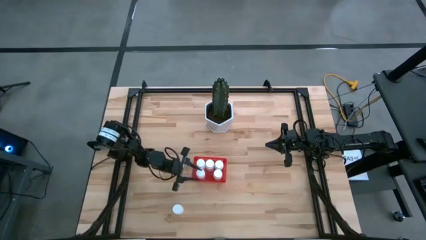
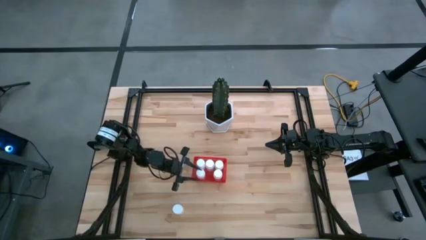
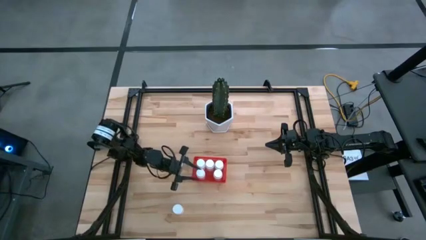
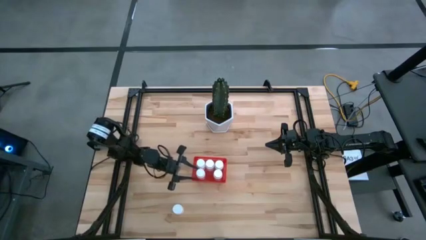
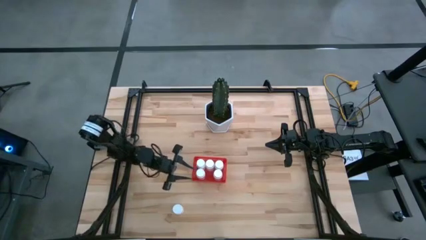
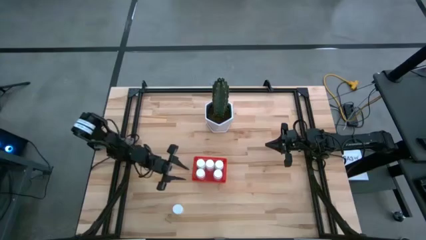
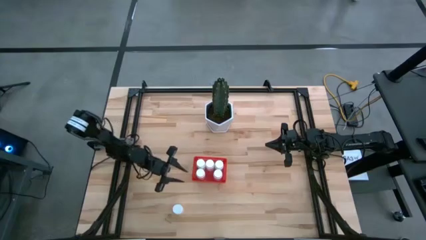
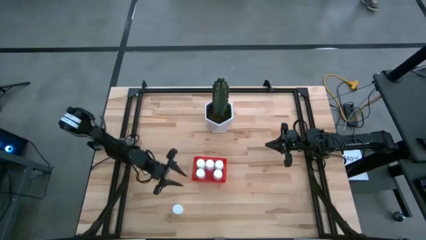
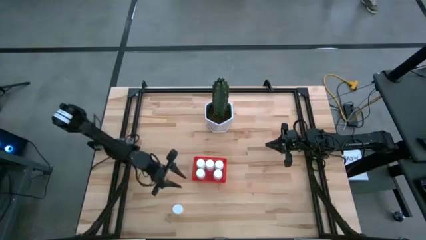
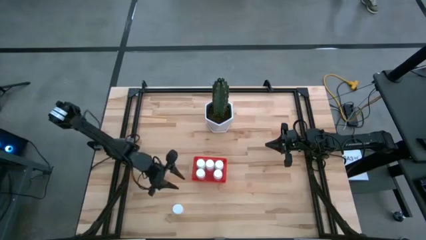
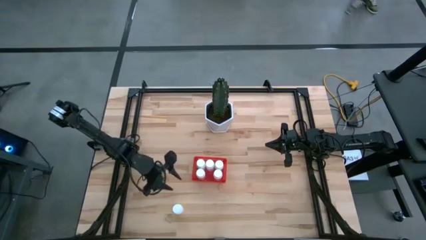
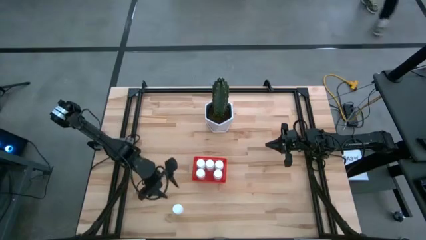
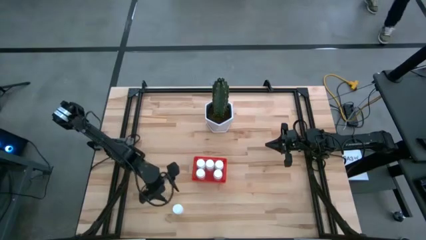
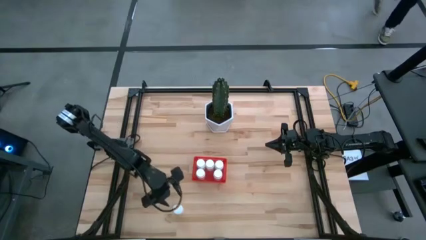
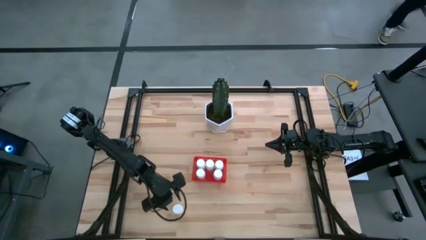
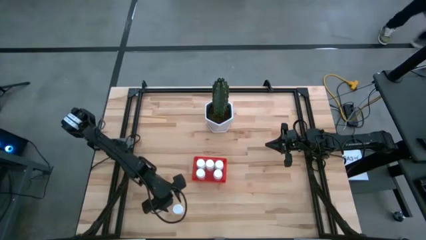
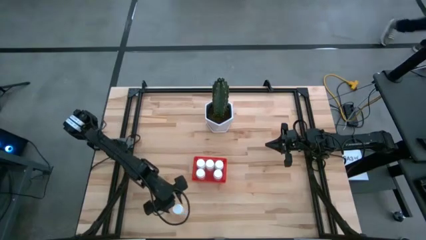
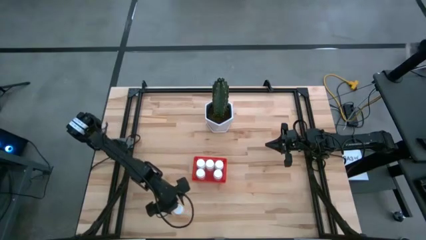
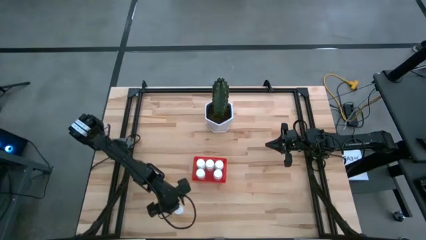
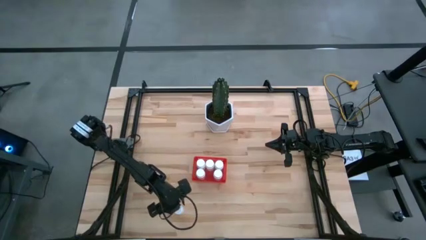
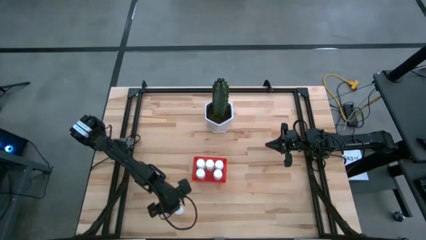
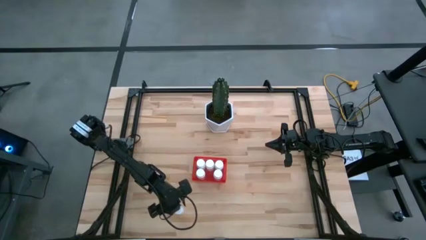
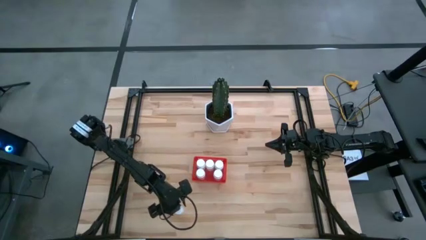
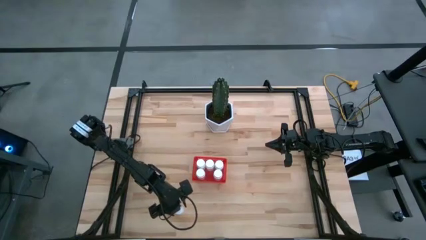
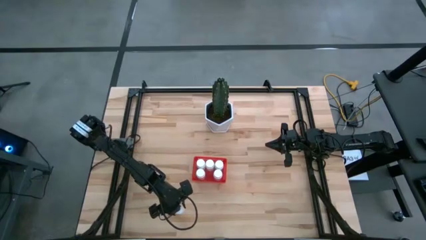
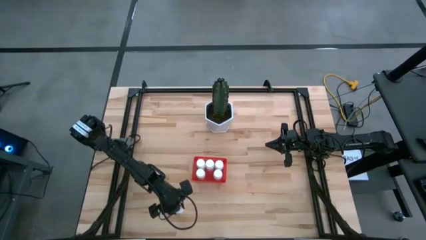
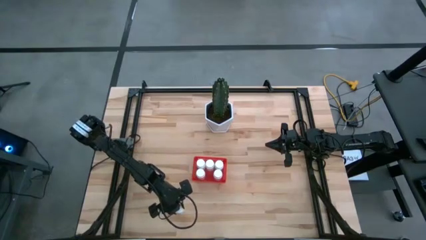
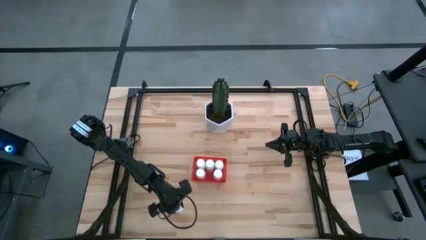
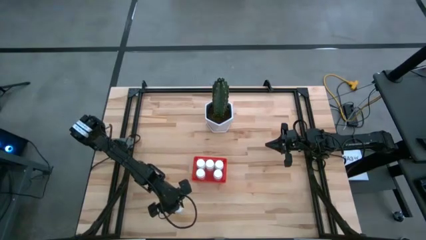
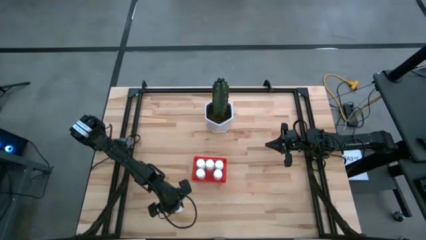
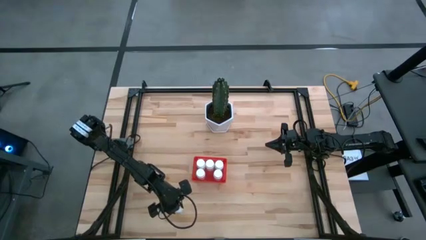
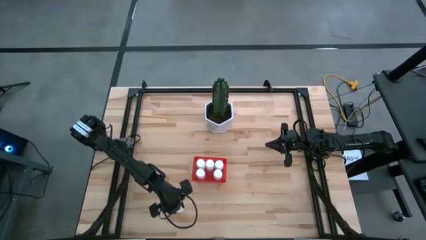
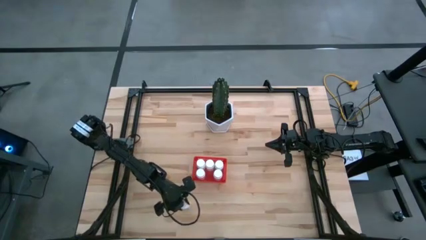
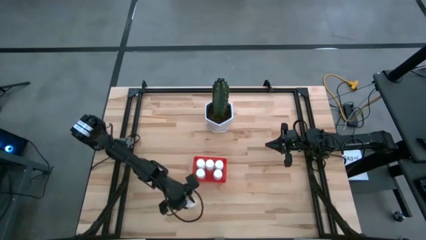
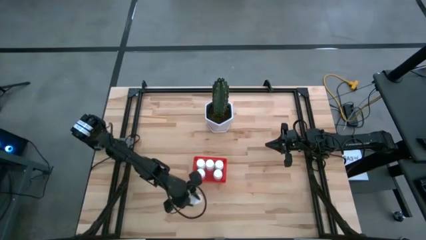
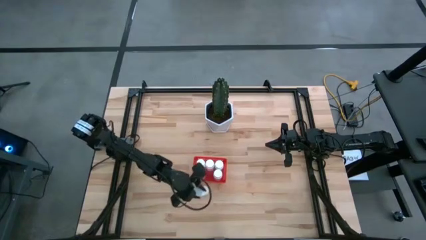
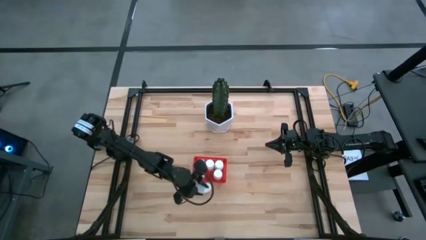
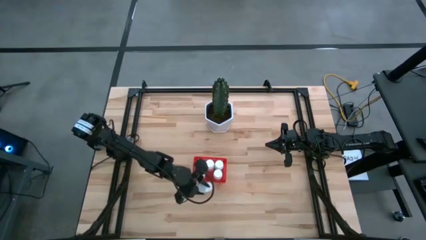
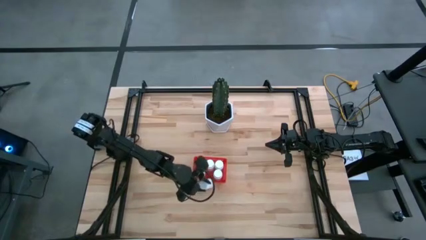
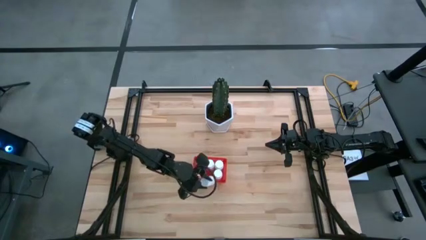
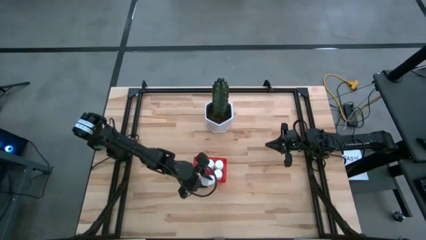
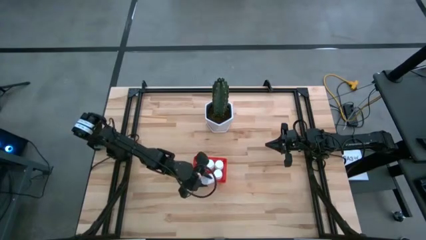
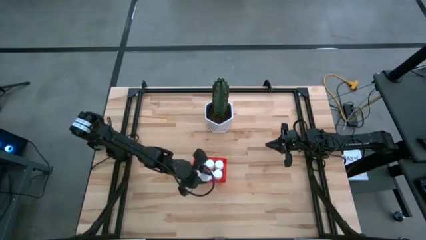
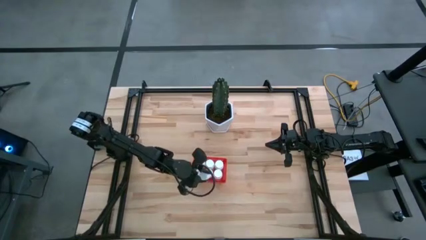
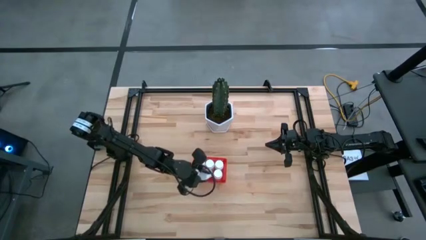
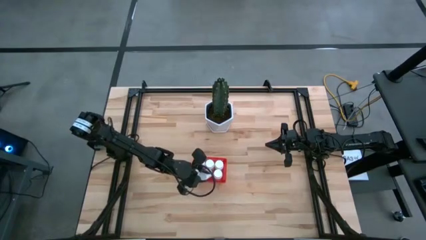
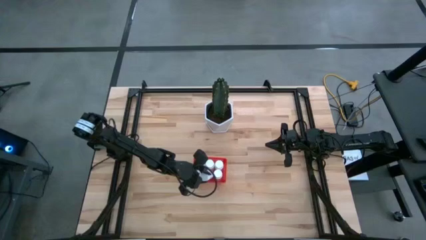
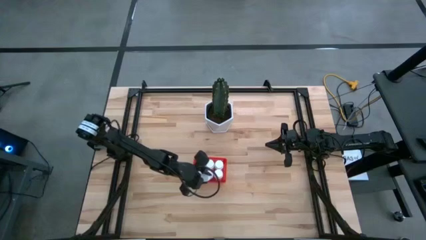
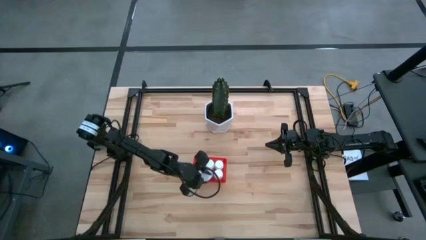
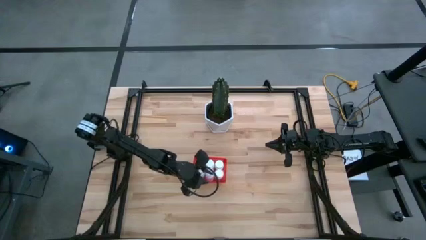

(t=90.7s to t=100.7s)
Task: Pick and place pill bottles into a basket
Put the medicine bottle into the red bin

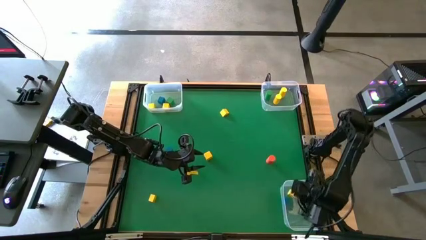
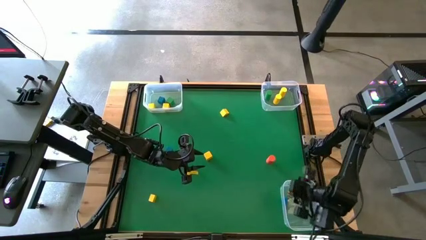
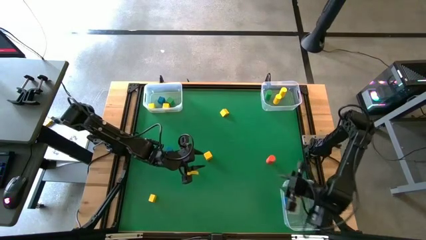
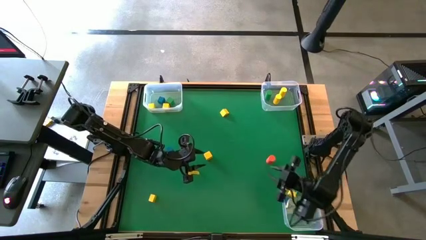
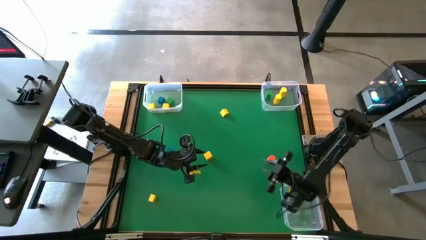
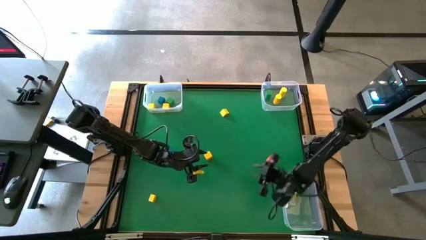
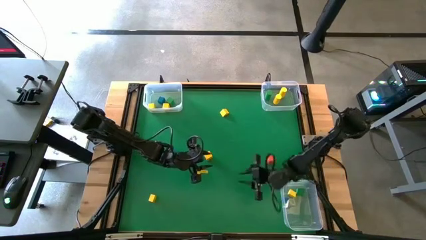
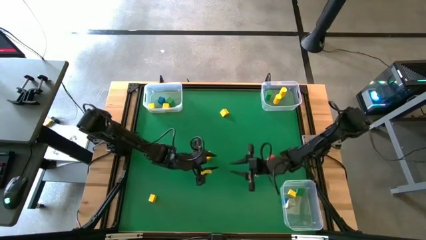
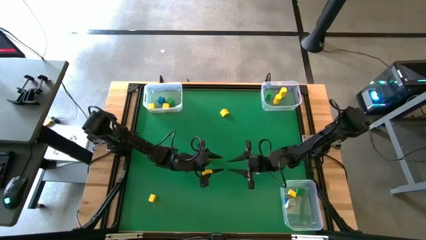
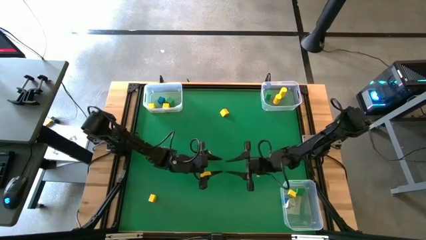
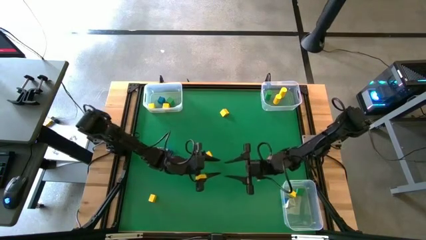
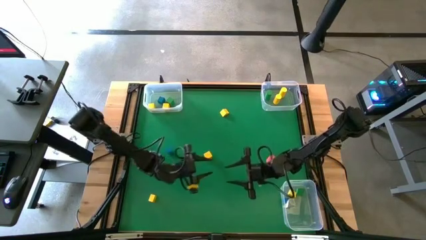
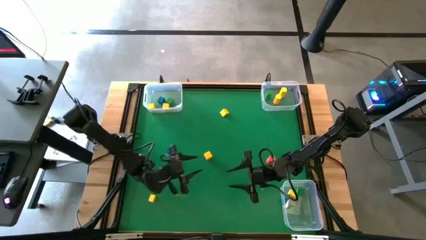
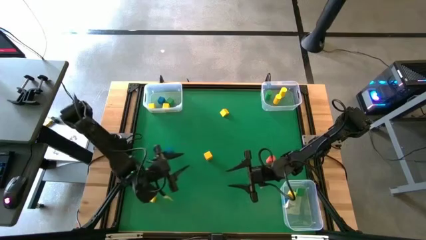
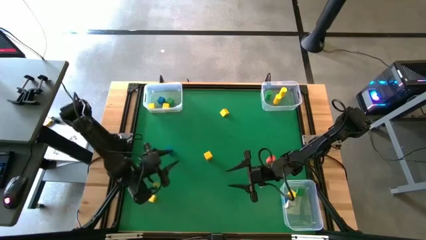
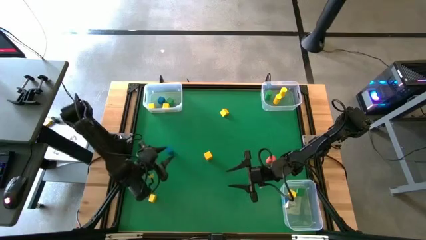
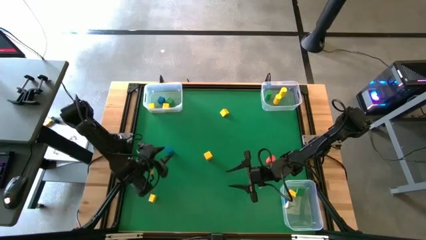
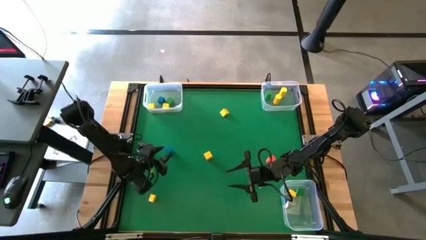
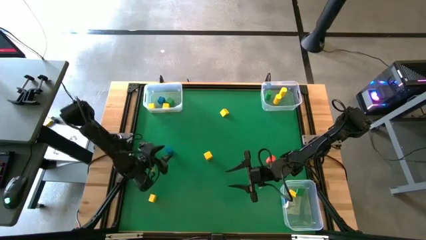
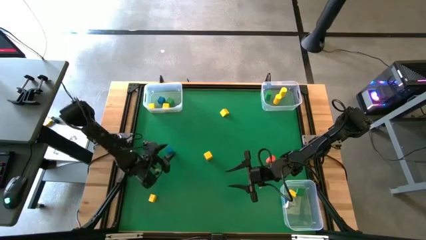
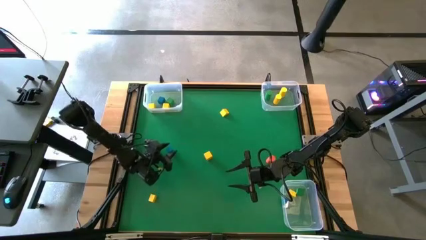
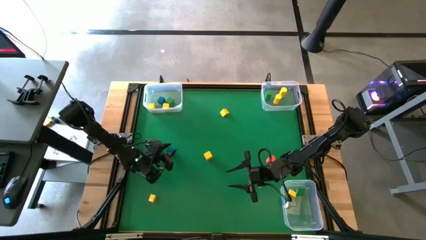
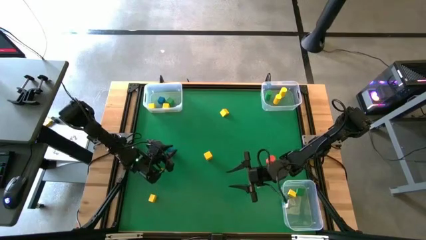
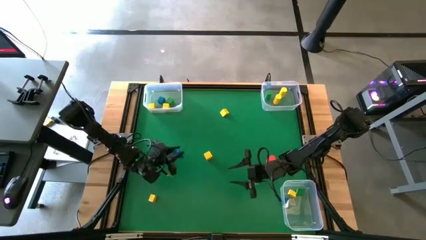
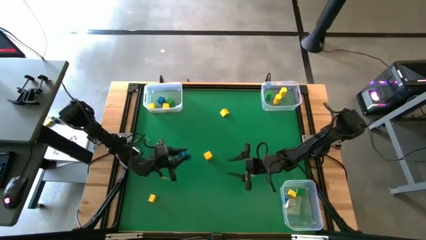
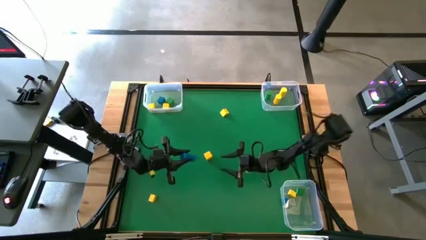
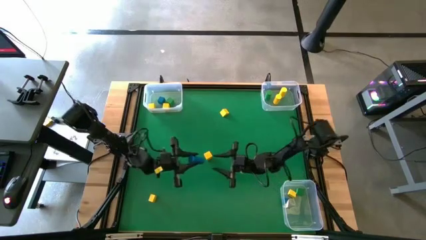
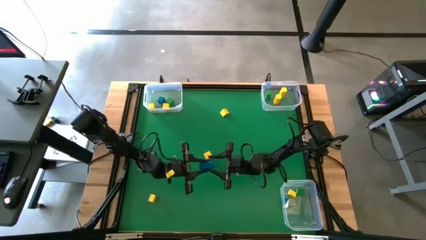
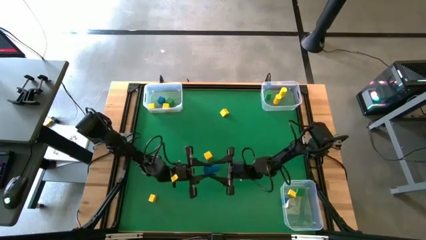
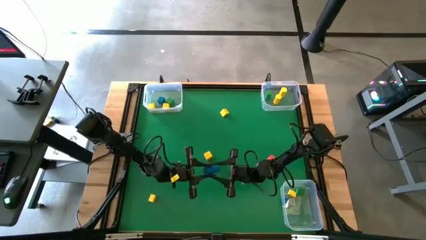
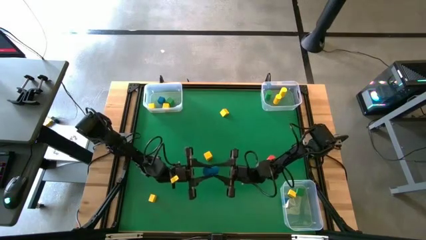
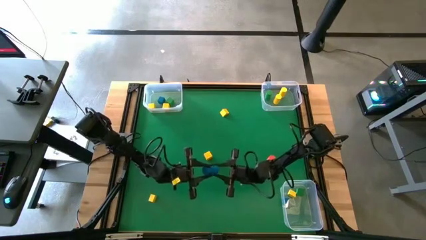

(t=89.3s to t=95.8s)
Task: Sort blocks by size
Put the blue cylindrical block into the top right transparent bin
